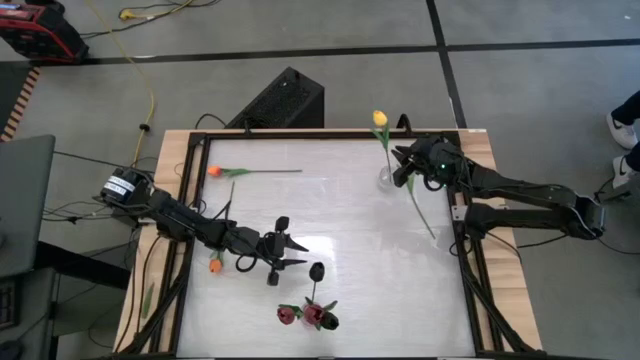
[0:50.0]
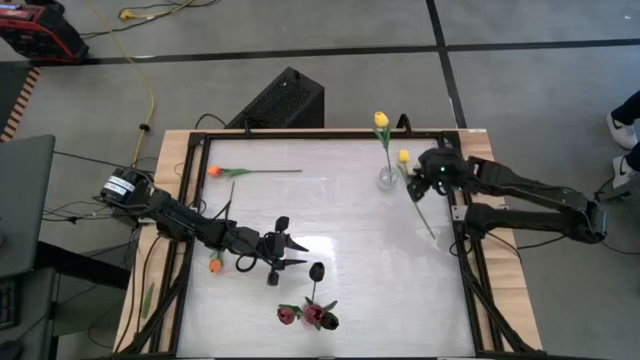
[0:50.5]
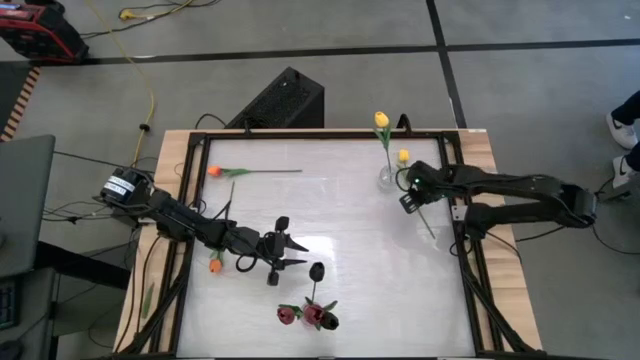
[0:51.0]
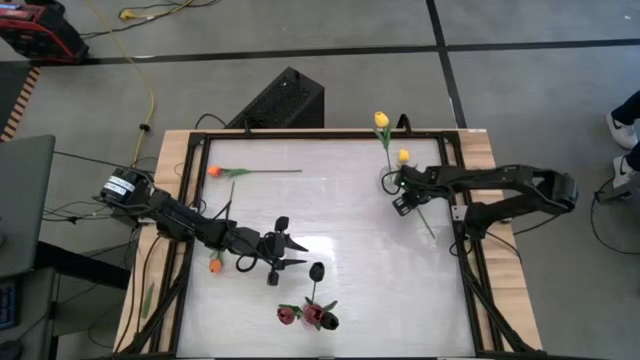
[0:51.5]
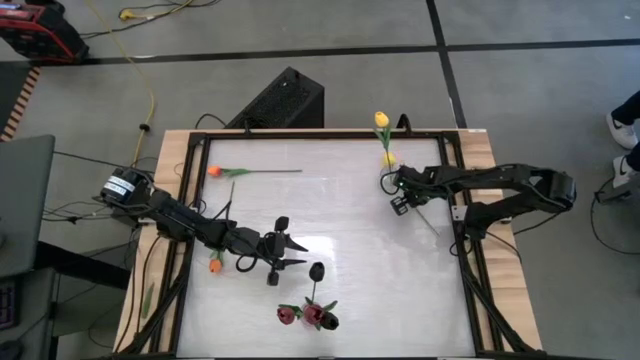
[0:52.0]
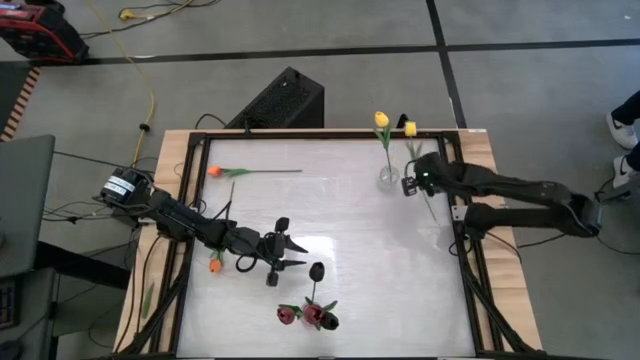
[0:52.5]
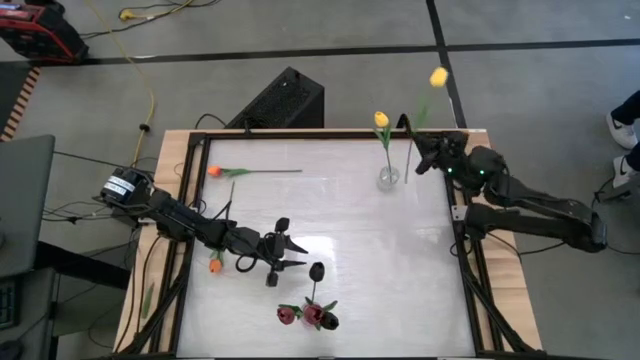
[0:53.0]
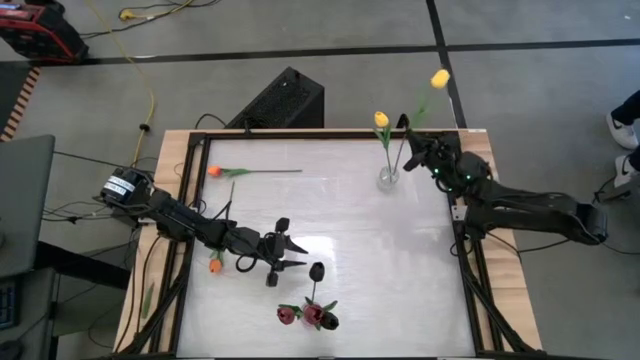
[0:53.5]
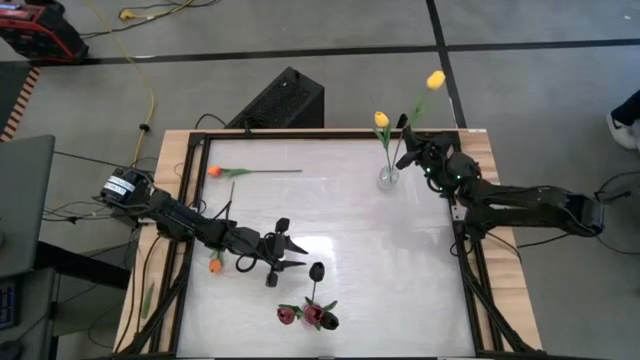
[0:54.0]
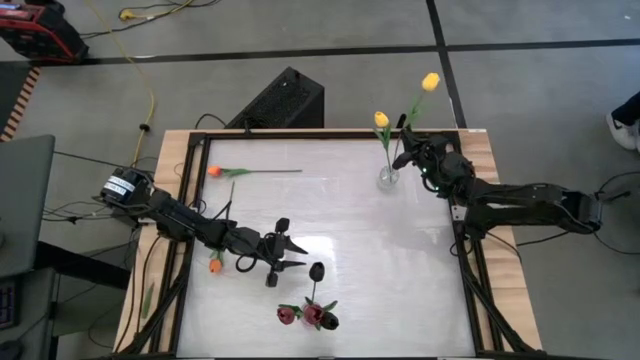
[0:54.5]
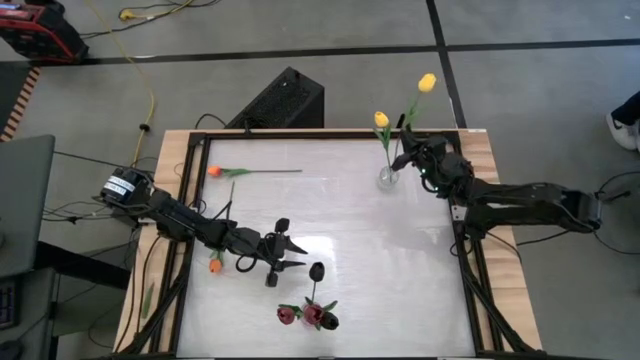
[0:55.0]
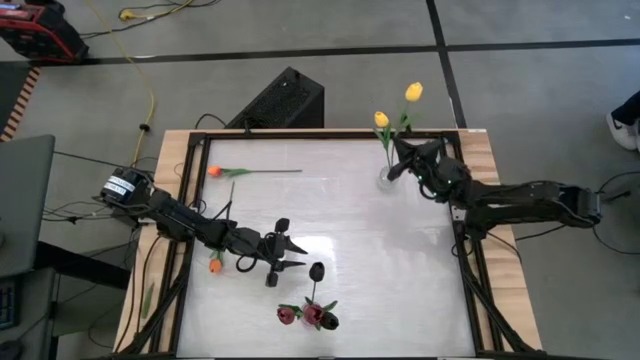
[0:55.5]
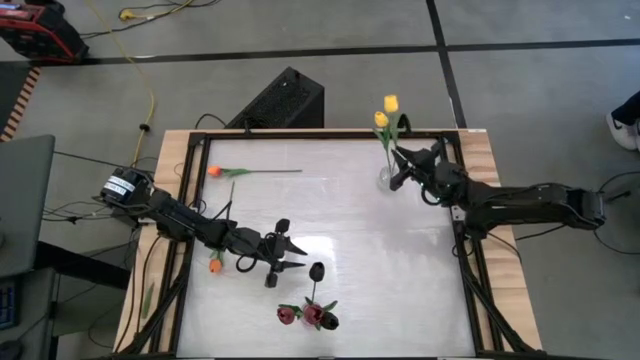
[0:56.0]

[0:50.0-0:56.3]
Task: Sort flowers into vase by color
Put the yellow tulip into the transparent vase

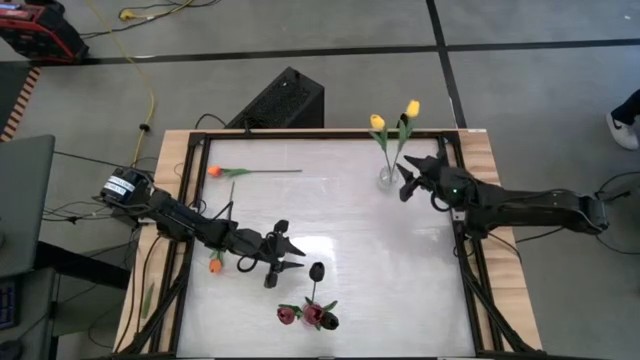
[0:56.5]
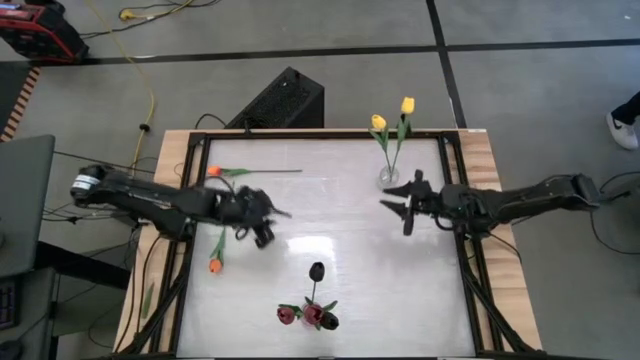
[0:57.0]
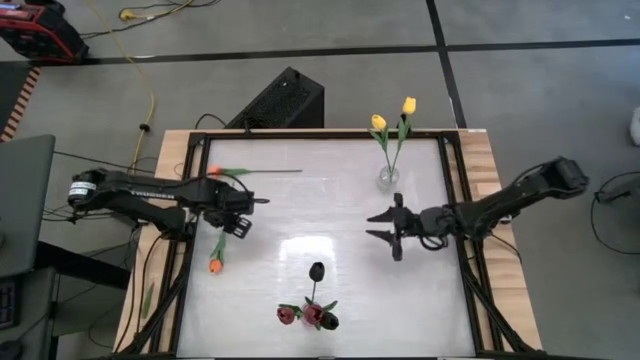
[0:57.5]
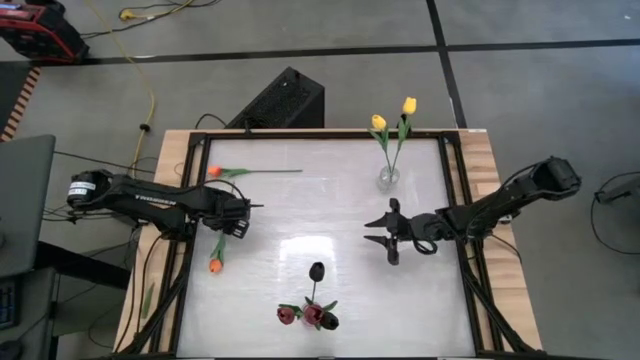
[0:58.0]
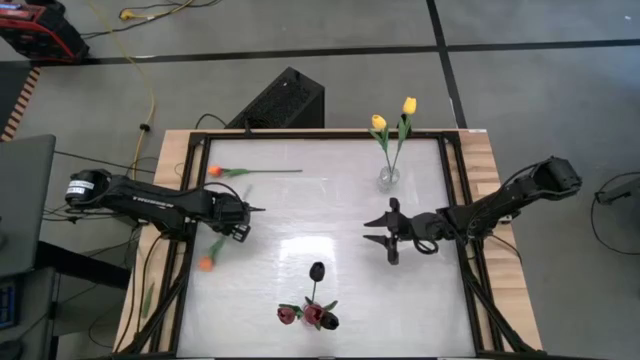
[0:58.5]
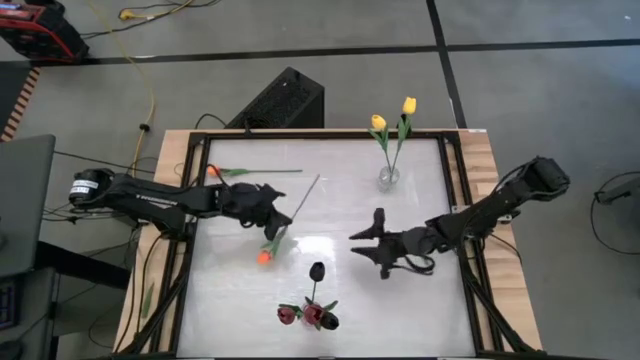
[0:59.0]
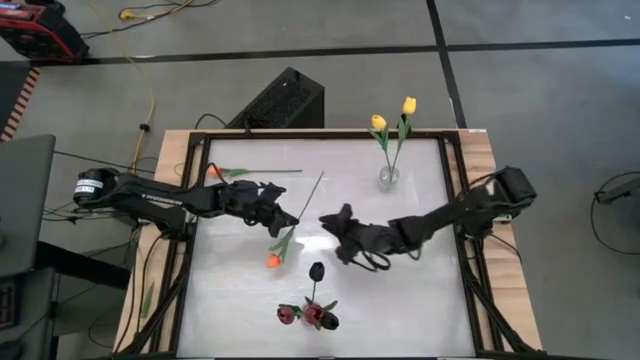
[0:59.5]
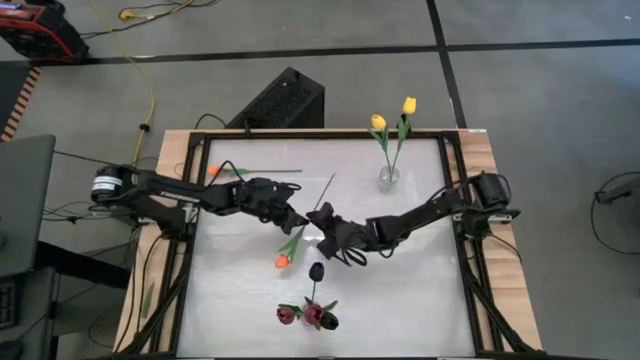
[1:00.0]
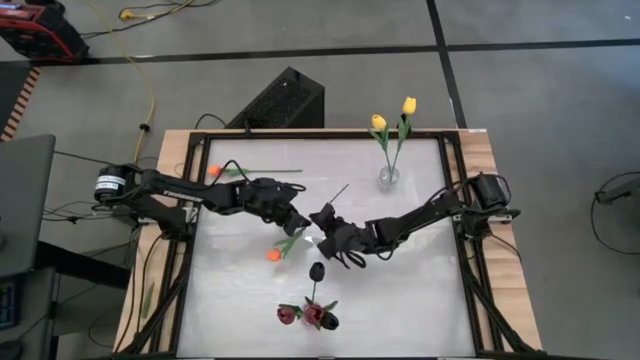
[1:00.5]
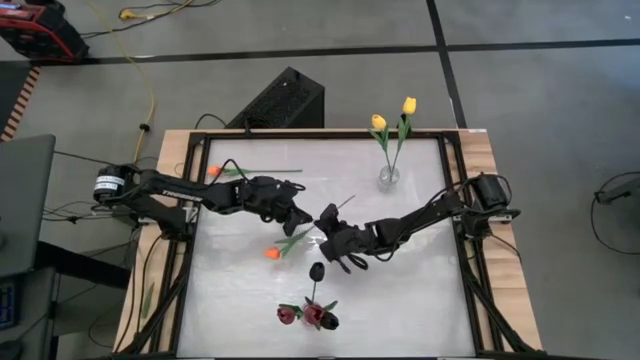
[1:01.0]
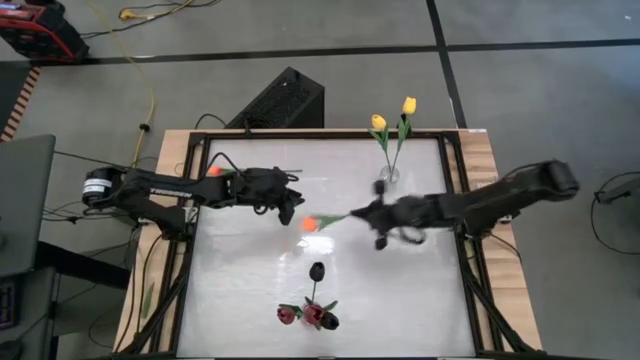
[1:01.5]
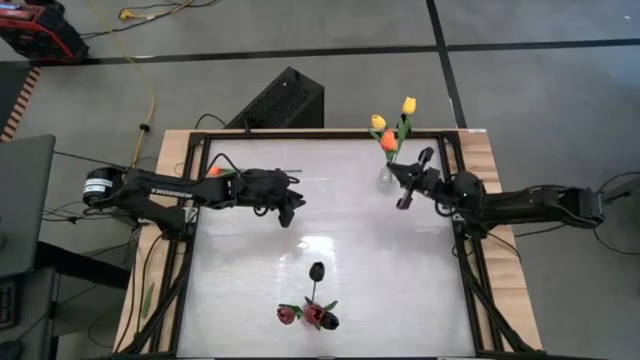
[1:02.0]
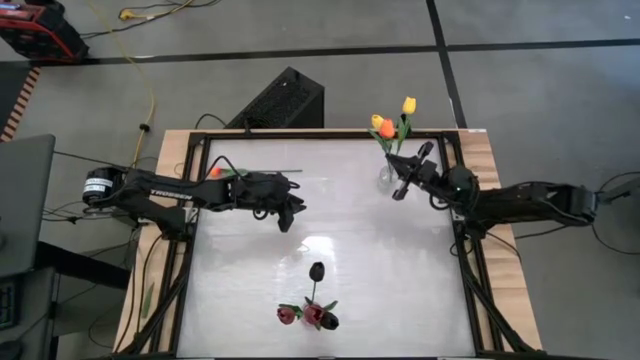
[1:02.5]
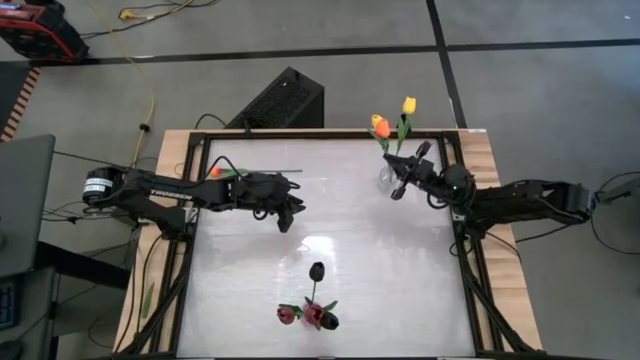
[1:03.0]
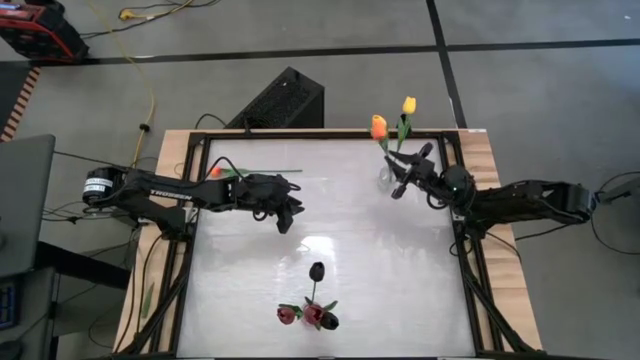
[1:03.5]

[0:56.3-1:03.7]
Put the bottom orange tulip into the transparent vase

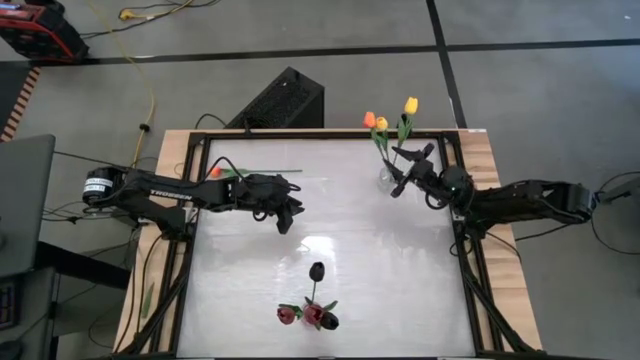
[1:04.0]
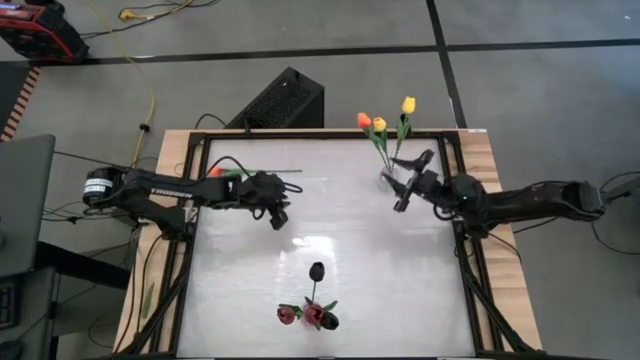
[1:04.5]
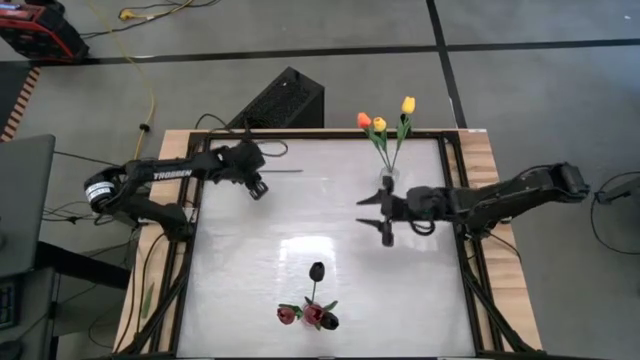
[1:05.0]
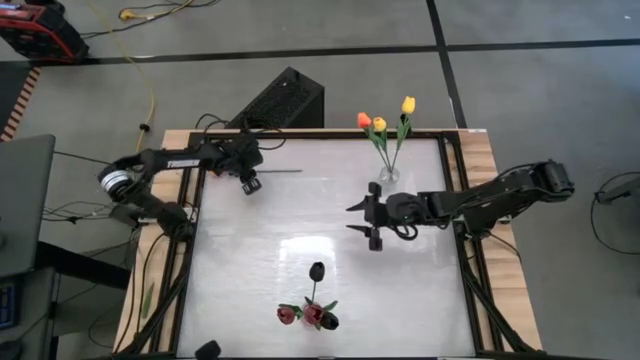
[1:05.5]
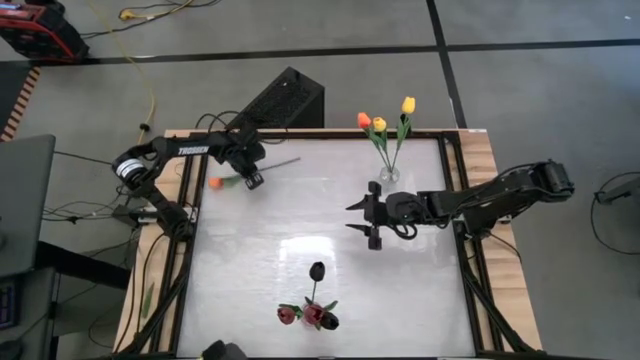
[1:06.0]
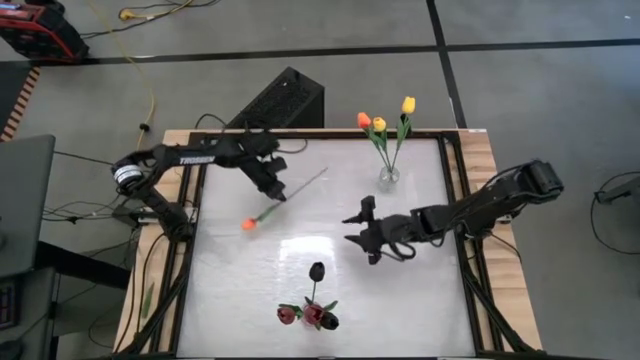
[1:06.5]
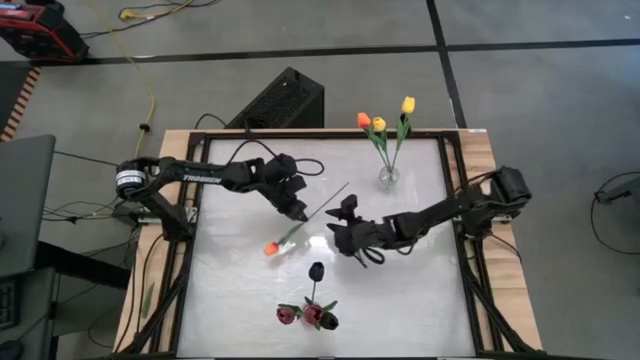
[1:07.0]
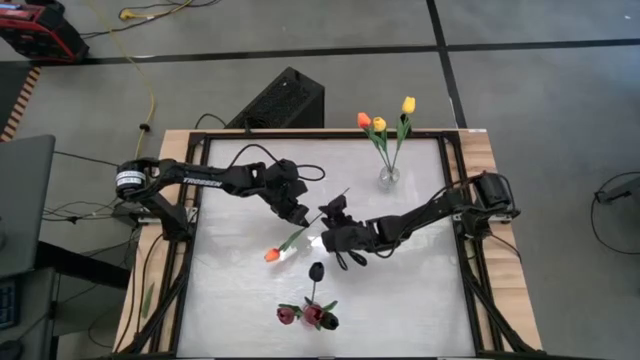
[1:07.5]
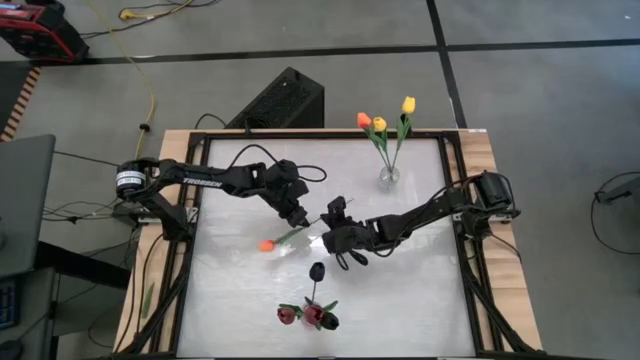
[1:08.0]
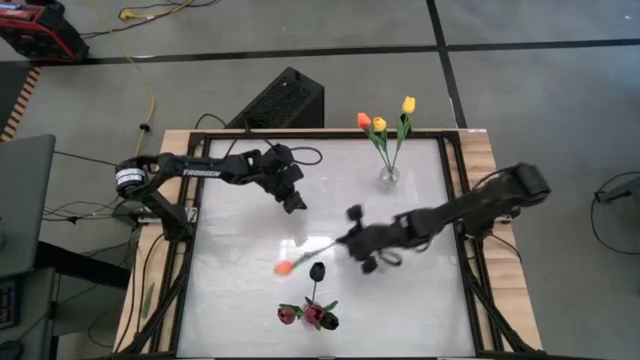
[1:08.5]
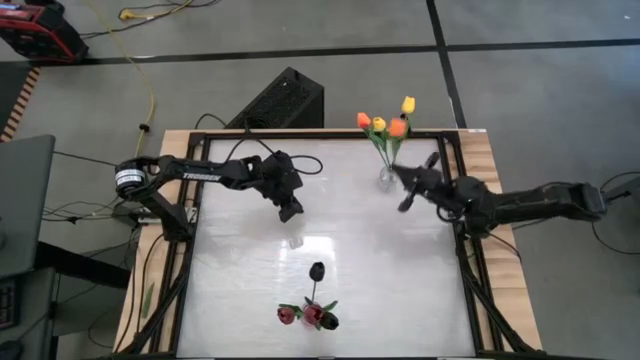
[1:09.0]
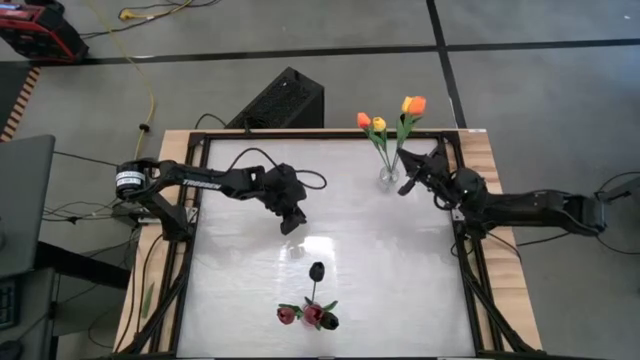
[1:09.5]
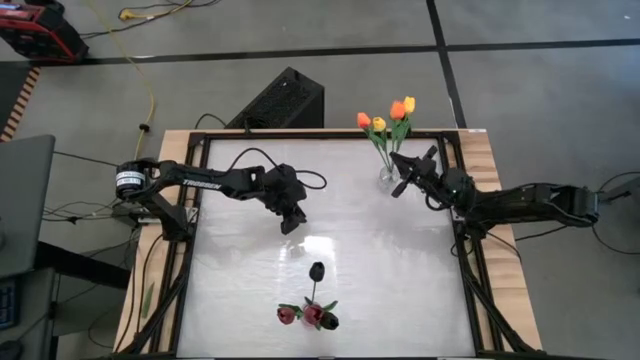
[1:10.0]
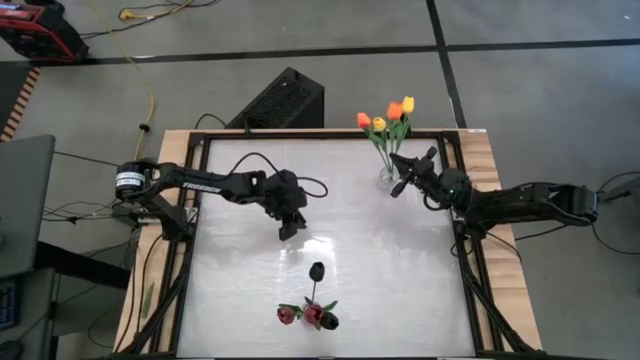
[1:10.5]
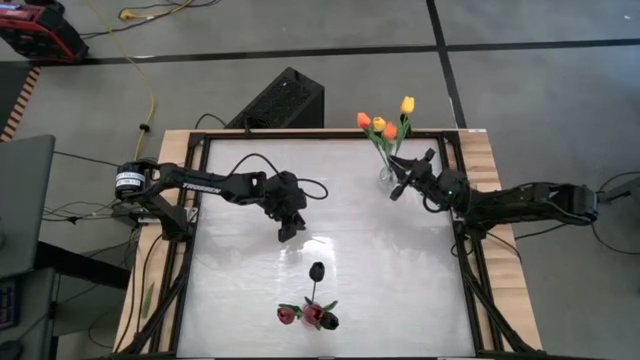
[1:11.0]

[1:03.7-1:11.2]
Put the orange tulip into the transparent vase

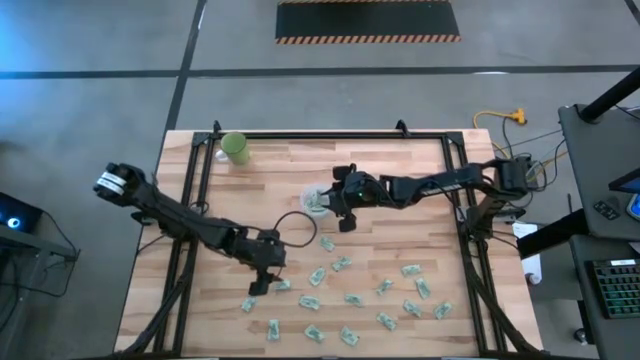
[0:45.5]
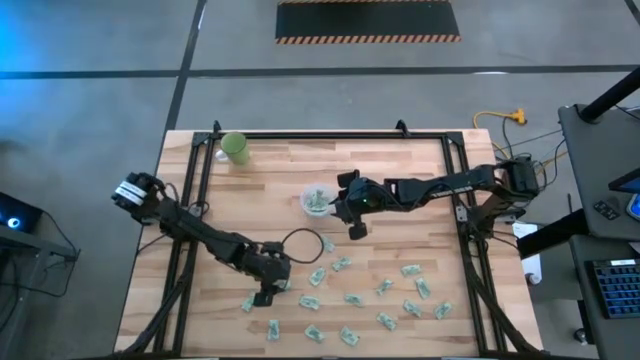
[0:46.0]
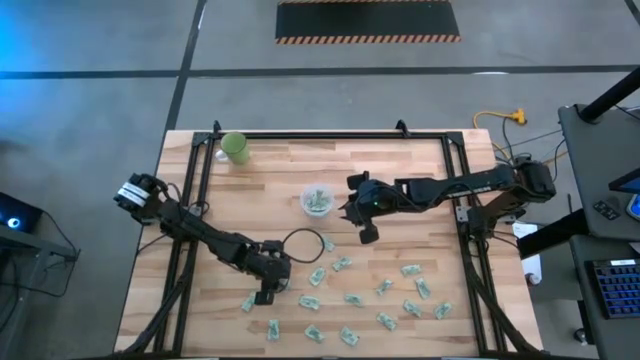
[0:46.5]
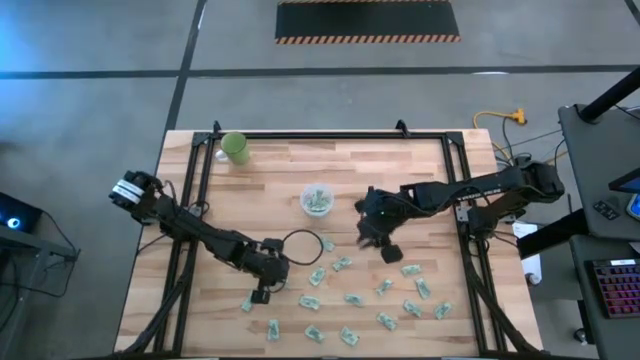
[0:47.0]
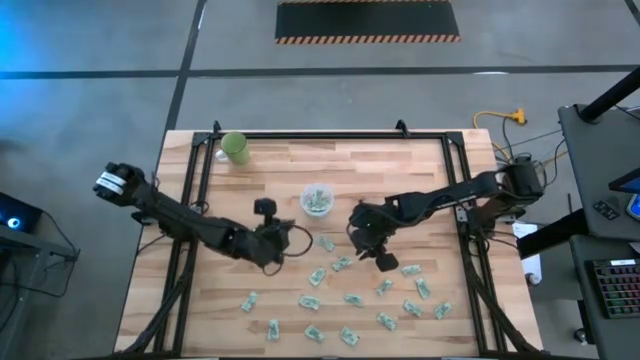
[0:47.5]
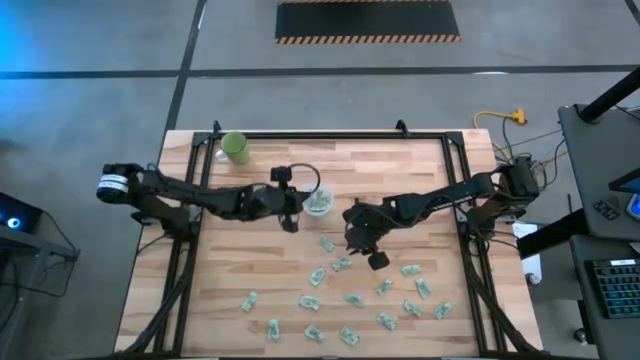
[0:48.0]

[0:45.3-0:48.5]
Task: Pick and place Stevia / Truvia into bins
Put the green stevia packet into the transparent container
